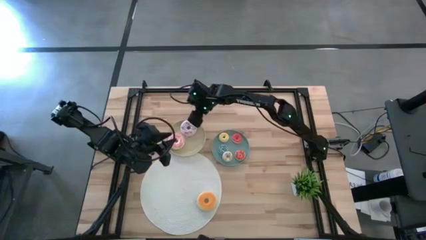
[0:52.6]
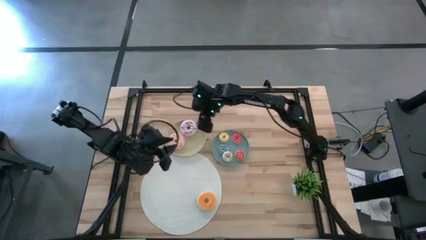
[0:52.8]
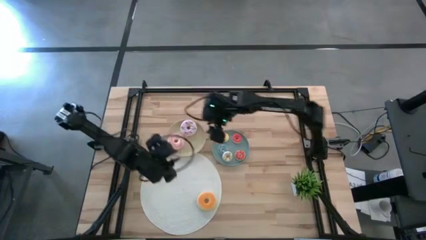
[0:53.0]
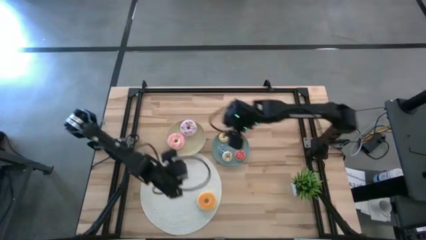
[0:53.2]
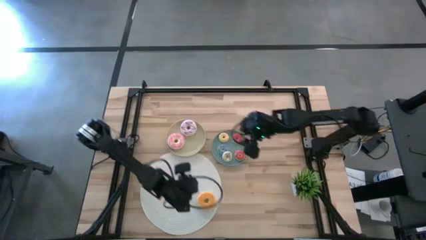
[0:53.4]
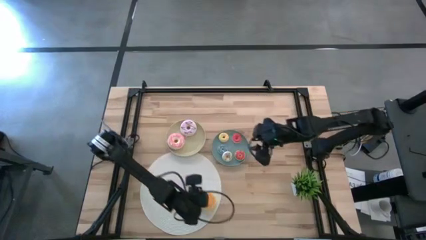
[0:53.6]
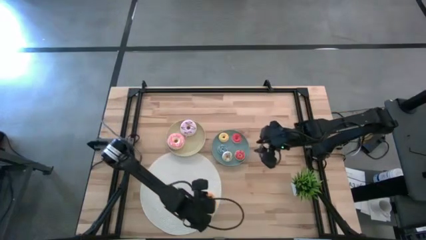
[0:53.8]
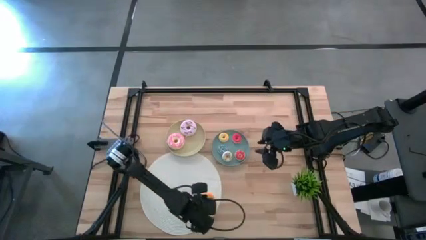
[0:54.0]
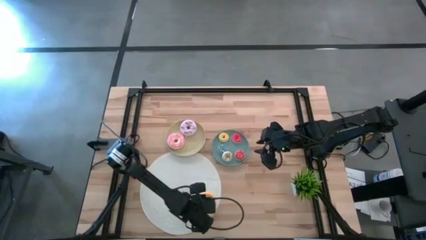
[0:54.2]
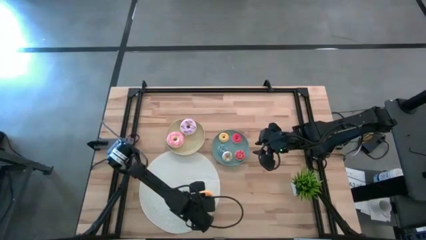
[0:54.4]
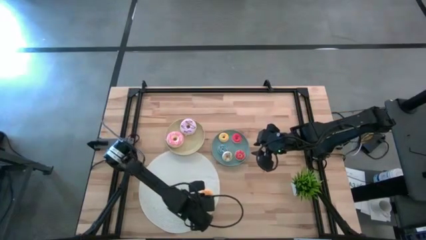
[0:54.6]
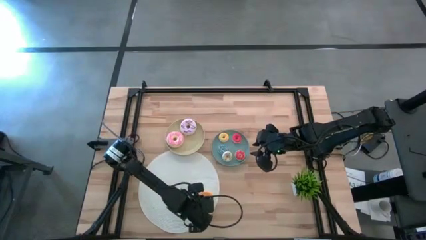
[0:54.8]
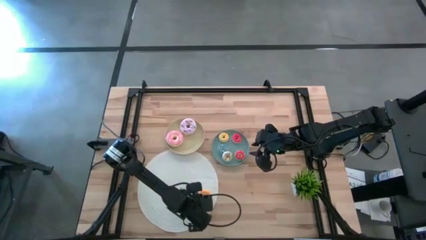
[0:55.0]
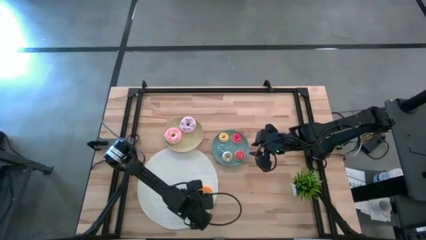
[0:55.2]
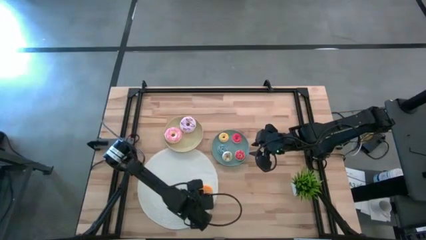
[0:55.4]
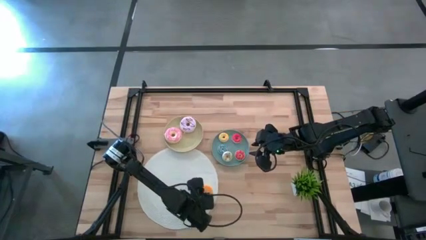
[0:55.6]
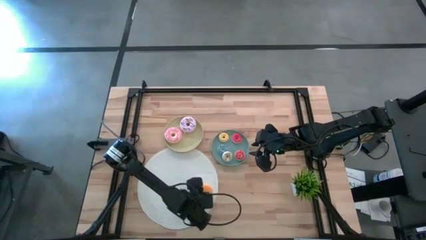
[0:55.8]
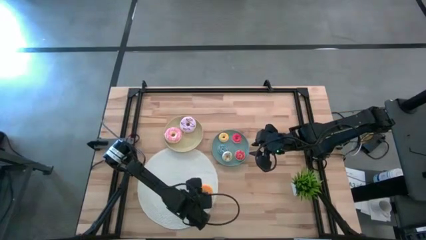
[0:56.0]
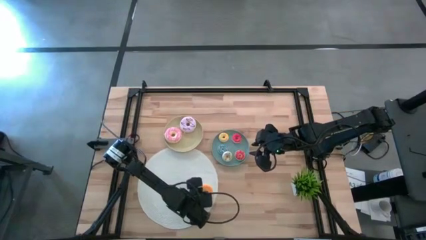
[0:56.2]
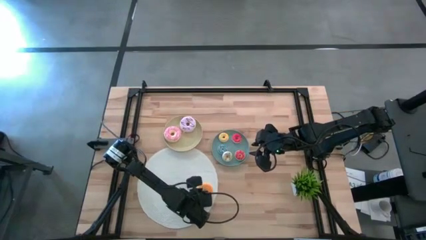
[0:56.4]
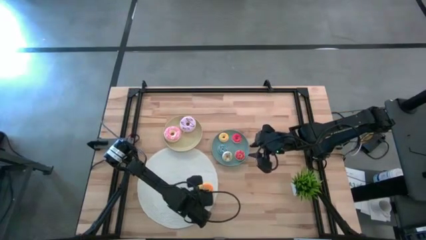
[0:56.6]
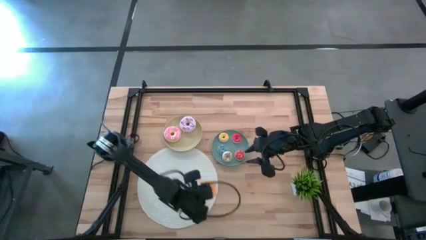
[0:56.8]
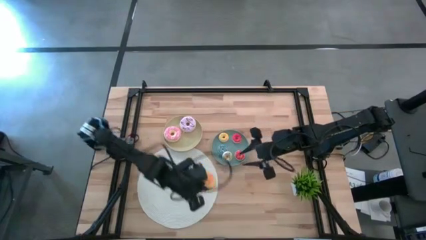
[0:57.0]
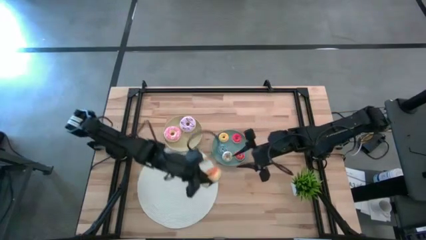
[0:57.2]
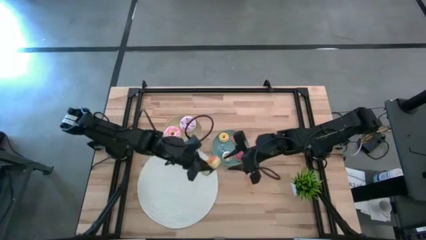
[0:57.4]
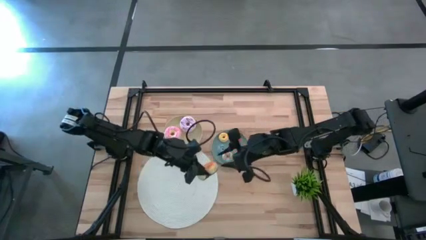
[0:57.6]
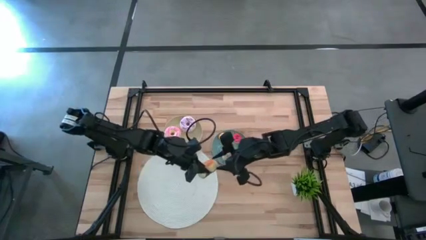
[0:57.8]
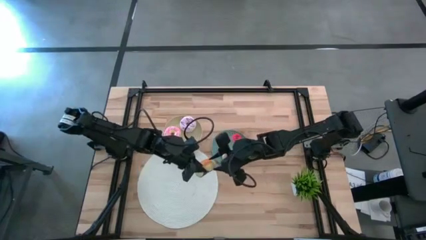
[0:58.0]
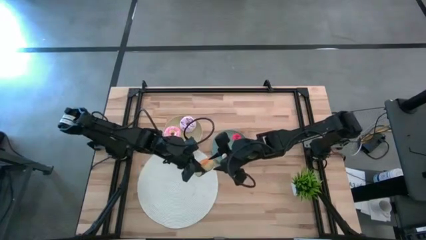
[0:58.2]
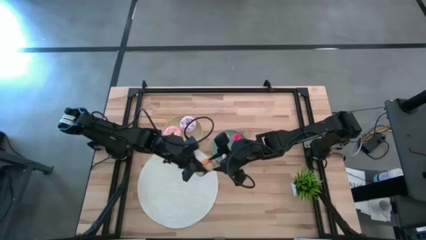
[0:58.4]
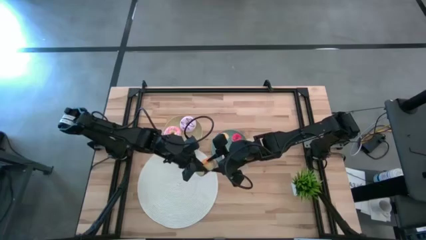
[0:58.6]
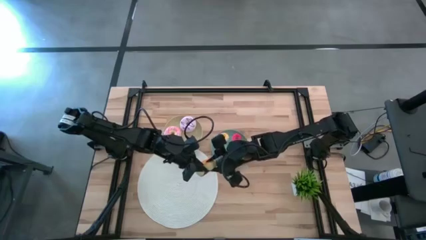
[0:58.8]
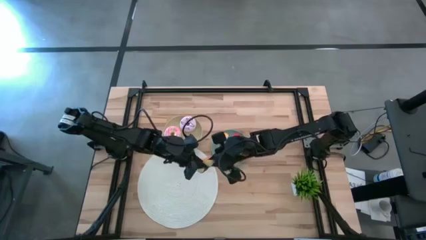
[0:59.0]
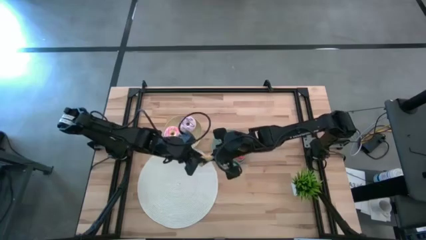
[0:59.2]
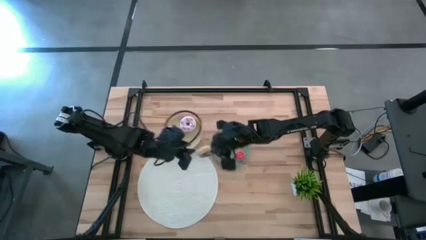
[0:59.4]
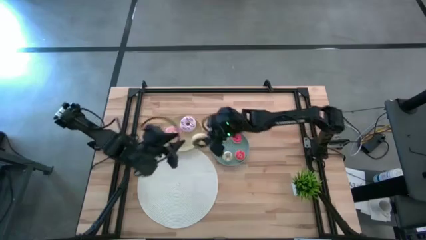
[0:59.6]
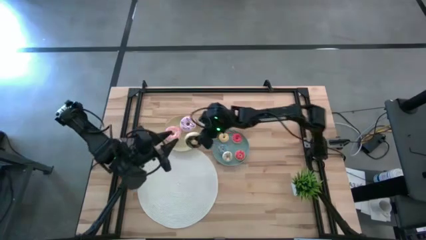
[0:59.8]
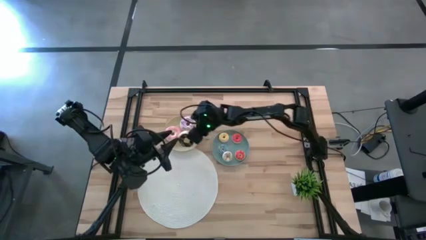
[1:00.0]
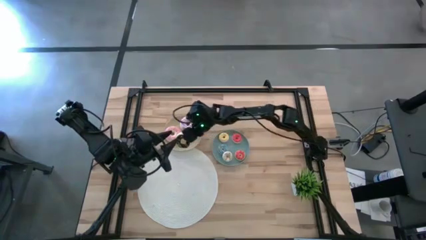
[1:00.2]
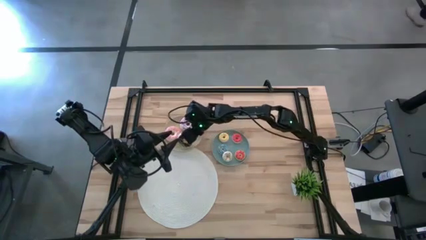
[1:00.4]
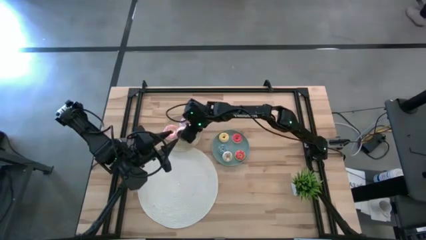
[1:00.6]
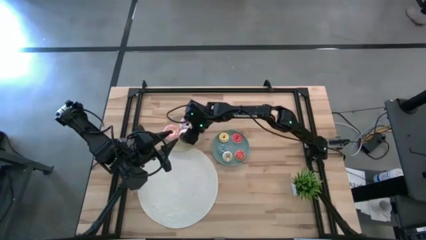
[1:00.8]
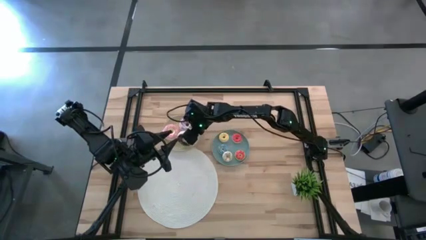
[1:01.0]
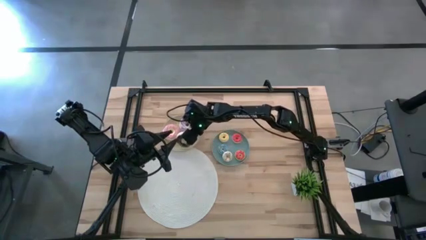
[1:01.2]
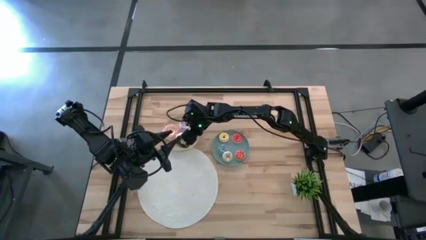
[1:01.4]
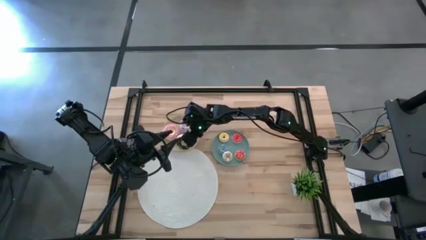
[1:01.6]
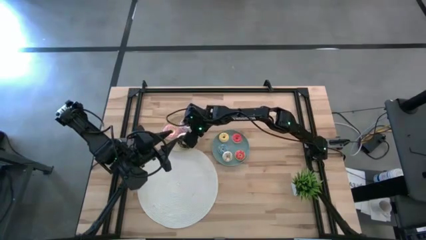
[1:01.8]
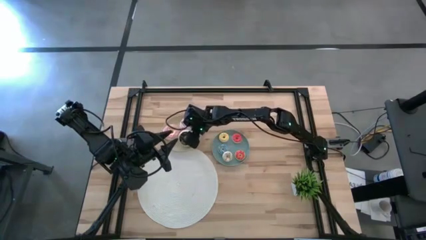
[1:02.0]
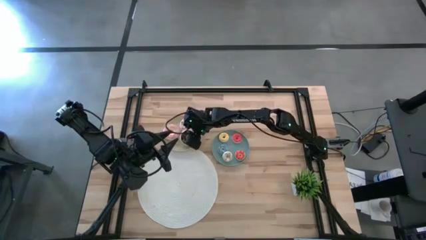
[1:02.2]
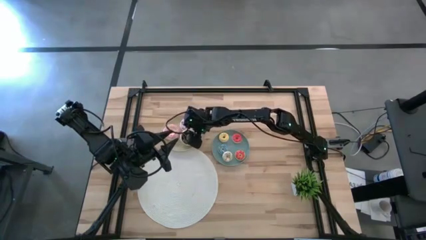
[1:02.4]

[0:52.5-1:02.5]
Task: Pick & Place donuts
Put the big brown donut on the brown plate

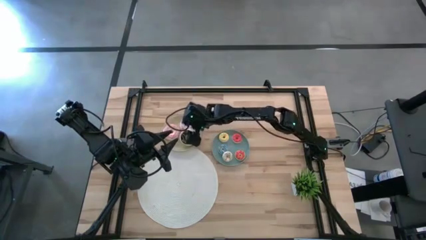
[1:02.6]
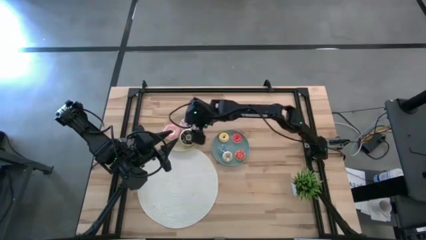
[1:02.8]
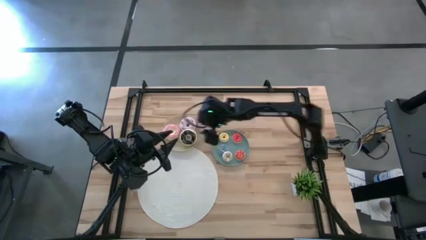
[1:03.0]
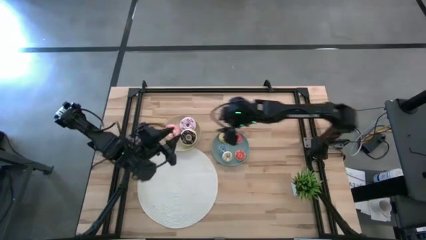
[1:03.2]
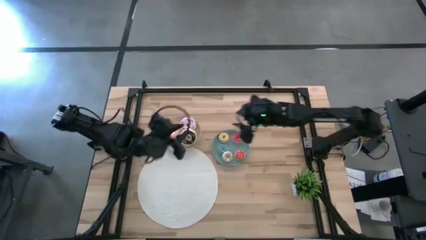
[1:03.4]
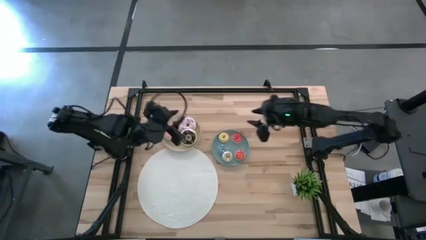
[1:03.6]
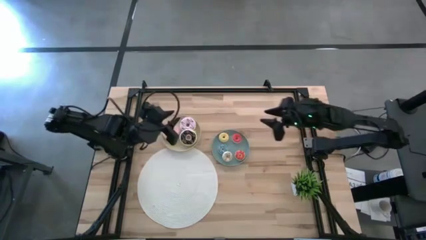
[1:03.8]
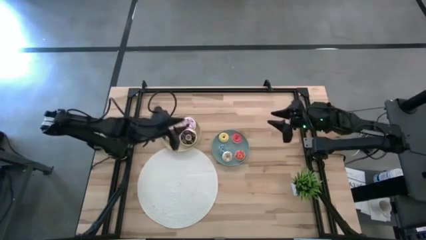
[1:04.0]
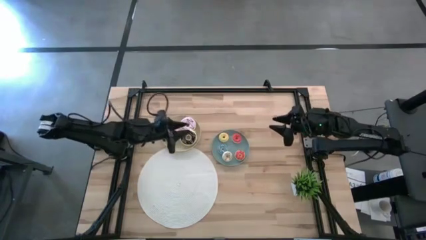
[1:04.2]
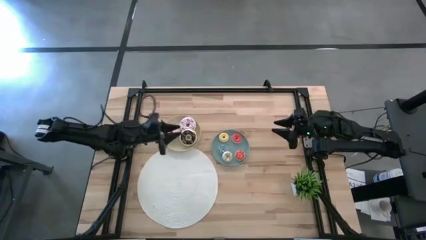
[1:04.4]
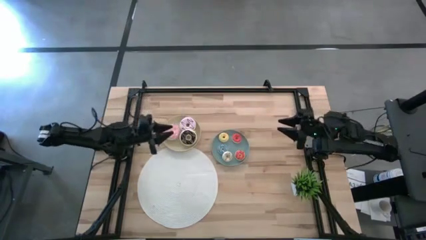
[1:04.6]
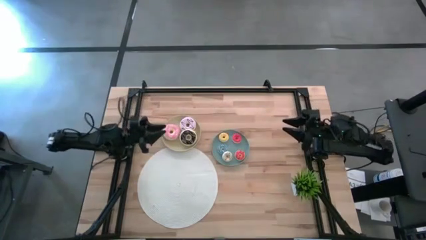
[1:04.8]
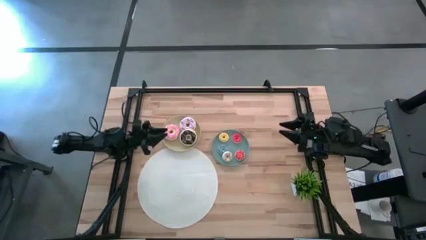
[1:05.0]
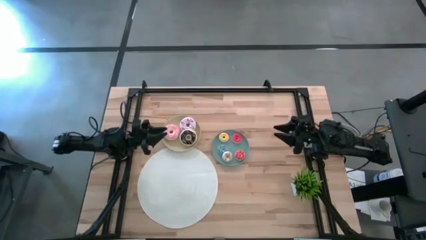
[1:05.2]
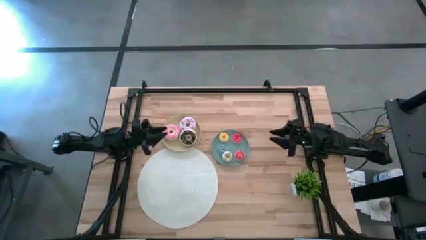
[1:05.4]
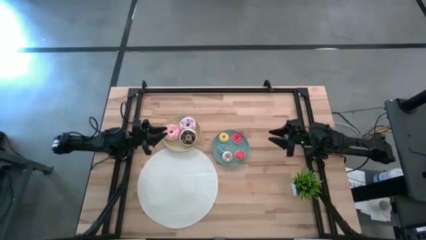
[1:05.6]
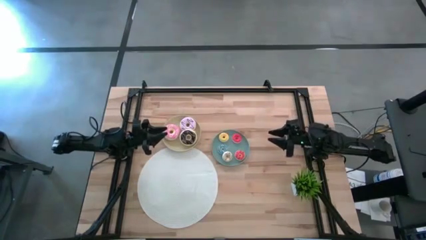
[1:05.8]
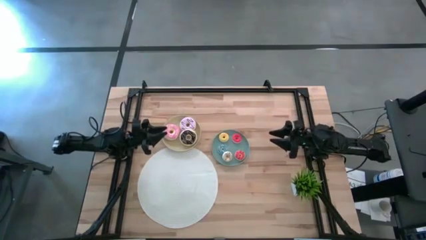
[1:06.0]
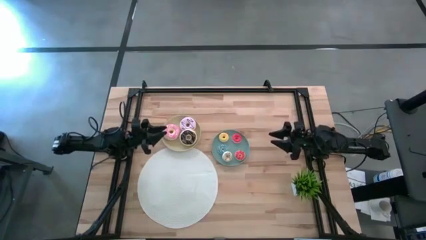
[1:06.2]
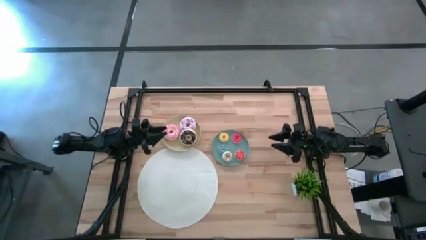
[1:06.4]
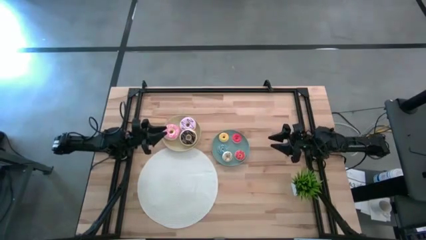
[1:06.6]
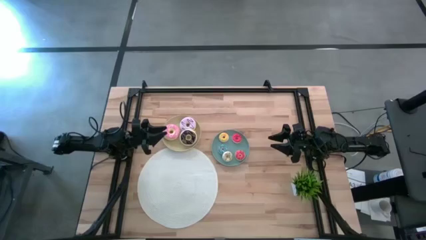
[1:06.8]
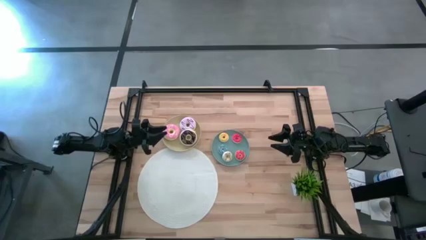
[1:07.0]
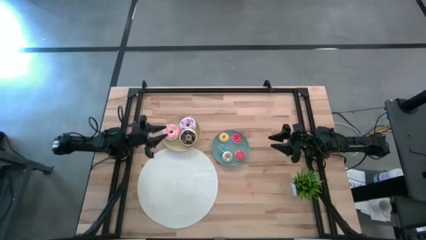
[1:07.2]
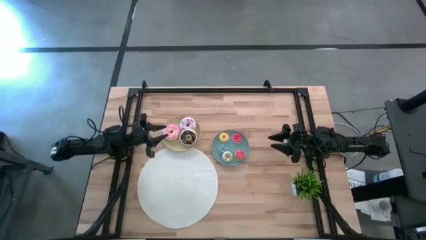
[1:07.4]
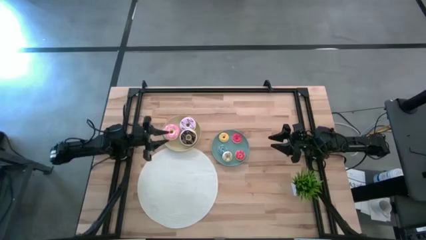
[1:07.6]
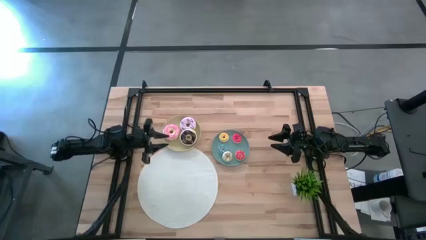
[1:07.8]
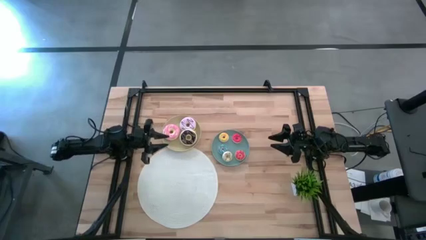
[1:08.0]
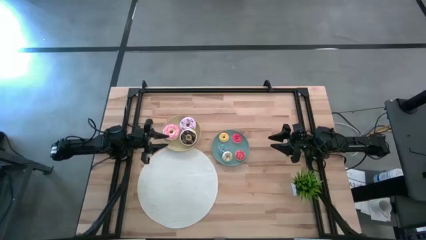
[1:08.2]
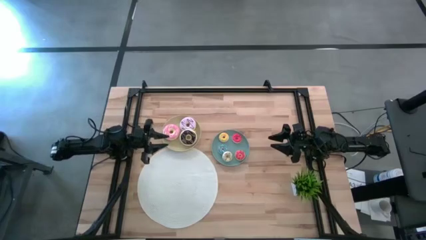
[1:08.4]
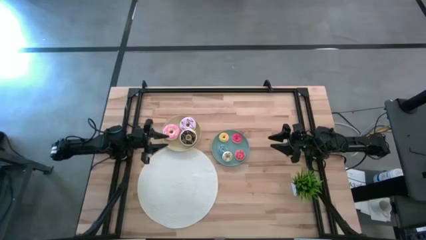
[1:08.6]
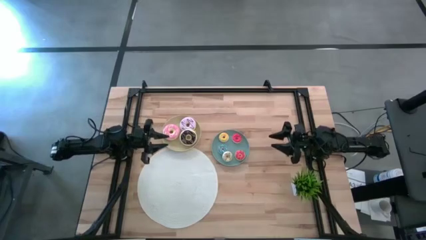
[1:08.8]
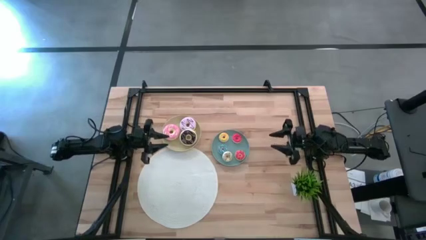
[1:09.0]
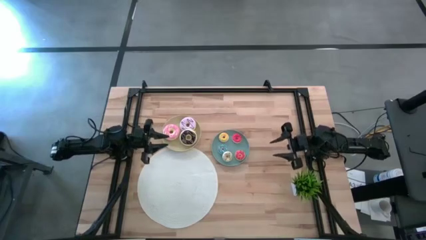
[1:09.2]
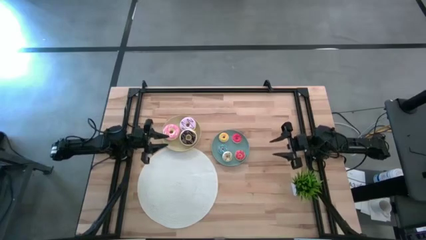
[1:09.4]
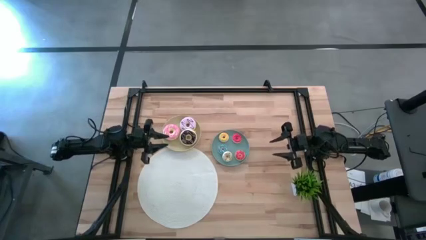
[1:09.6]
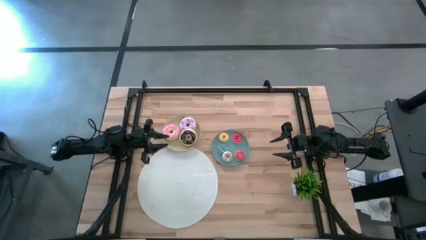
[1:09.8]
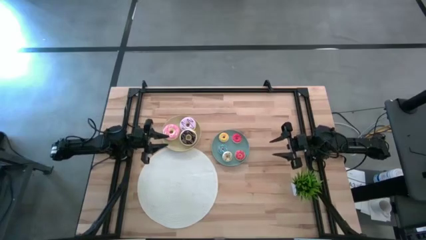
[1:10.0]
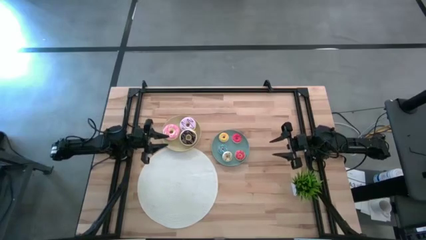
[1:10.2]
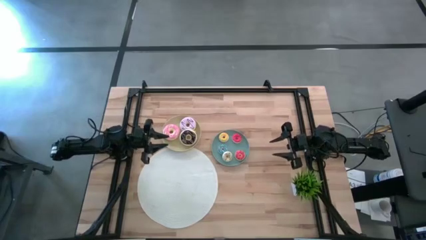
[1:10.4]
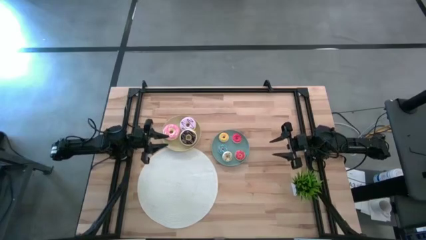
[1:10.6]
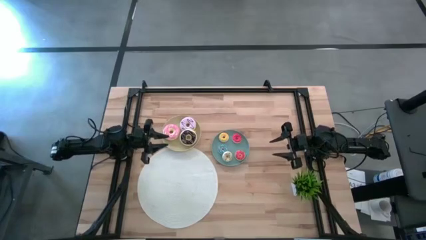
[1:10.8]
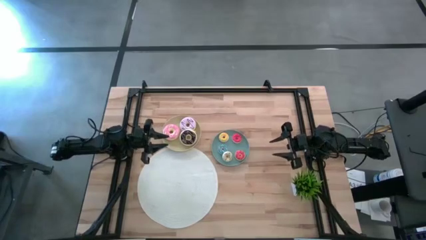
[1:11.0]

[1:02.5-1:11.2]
Return to Home Position
